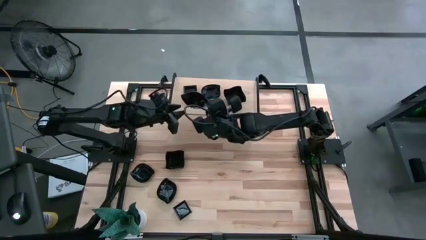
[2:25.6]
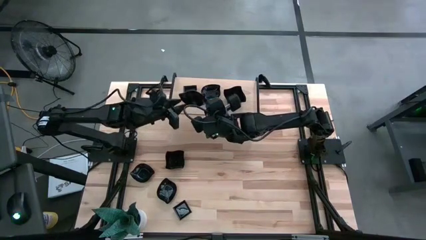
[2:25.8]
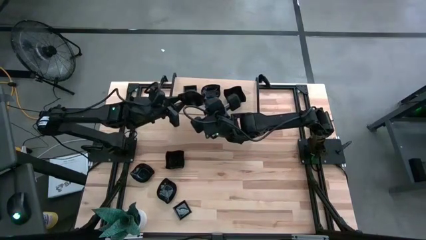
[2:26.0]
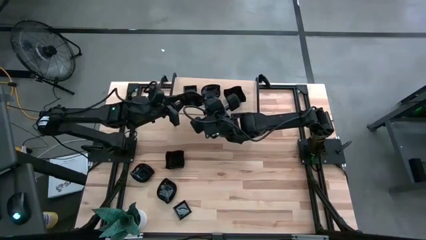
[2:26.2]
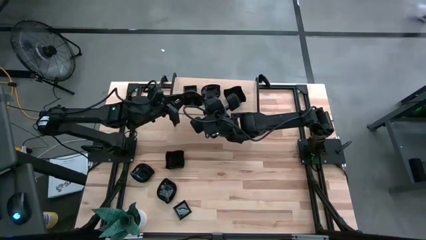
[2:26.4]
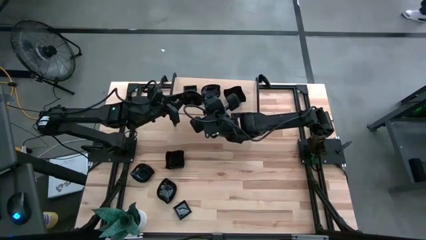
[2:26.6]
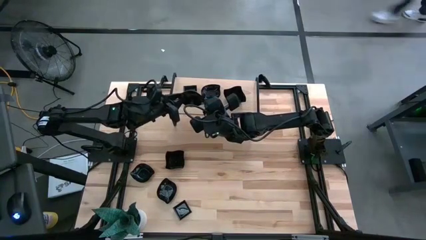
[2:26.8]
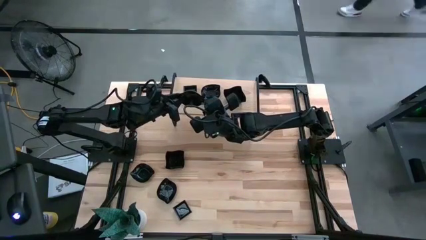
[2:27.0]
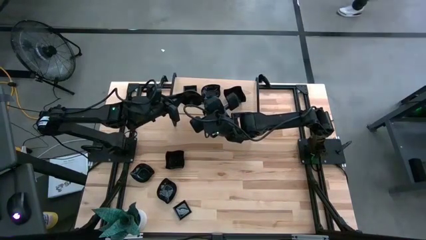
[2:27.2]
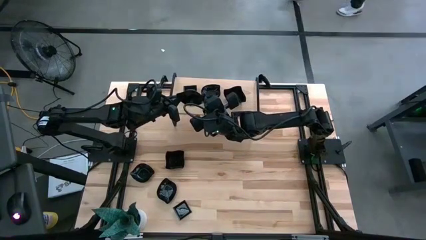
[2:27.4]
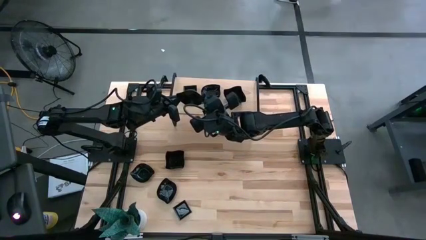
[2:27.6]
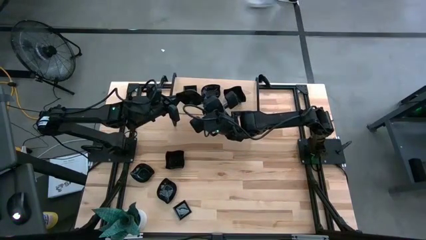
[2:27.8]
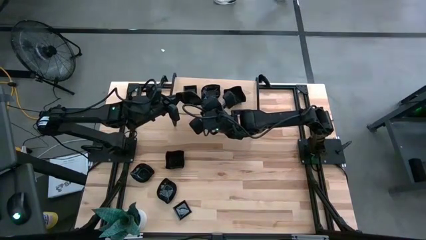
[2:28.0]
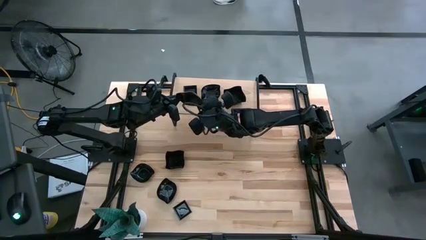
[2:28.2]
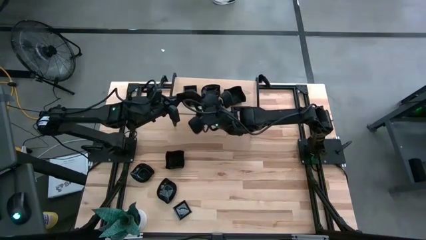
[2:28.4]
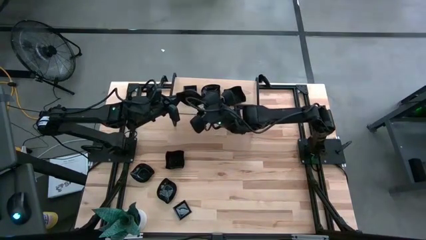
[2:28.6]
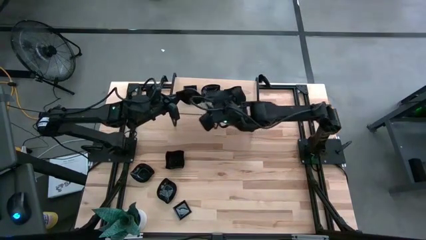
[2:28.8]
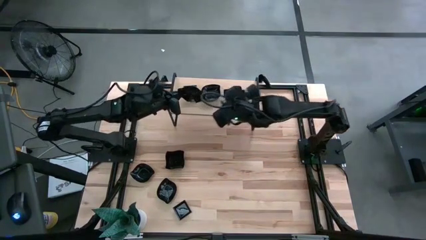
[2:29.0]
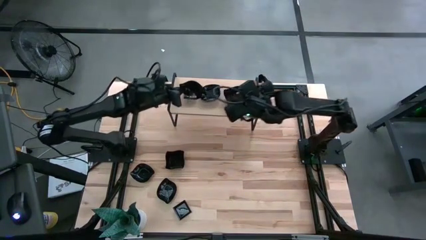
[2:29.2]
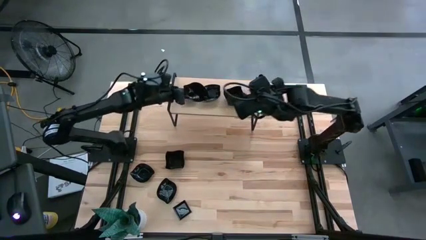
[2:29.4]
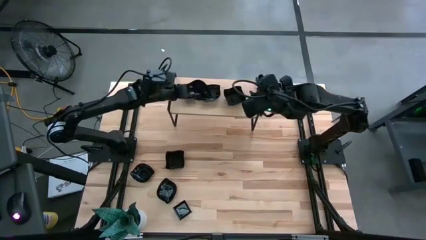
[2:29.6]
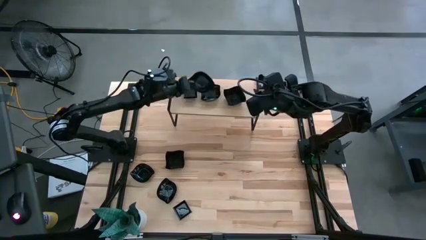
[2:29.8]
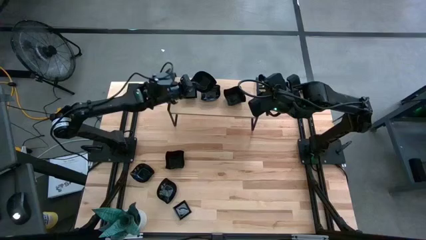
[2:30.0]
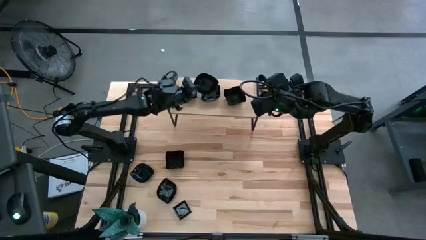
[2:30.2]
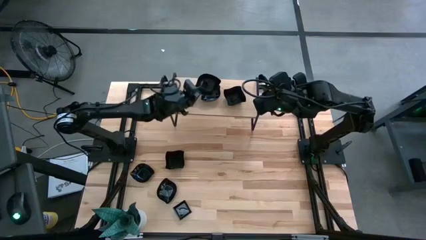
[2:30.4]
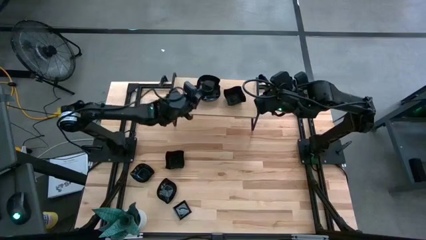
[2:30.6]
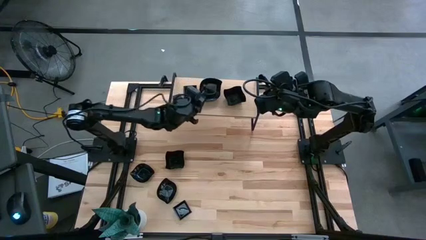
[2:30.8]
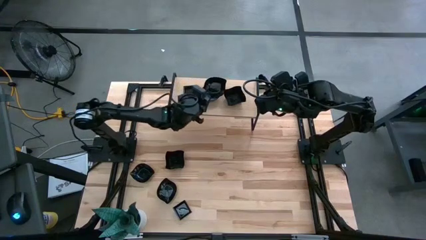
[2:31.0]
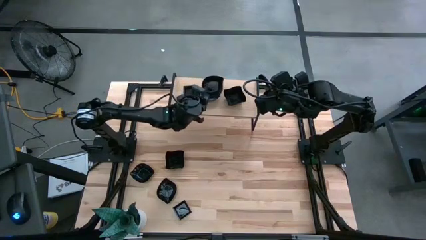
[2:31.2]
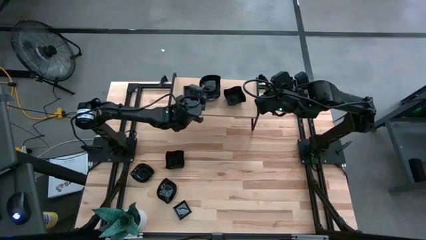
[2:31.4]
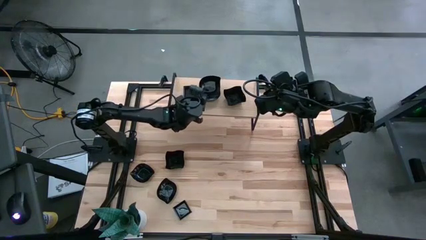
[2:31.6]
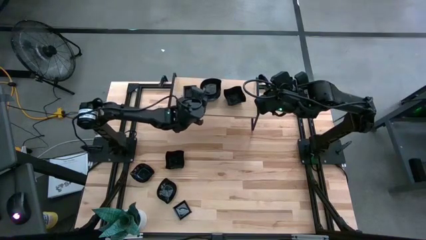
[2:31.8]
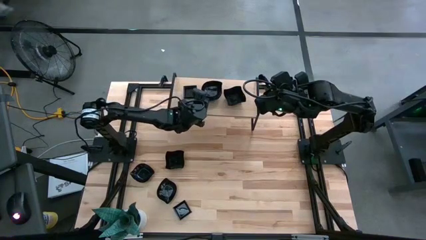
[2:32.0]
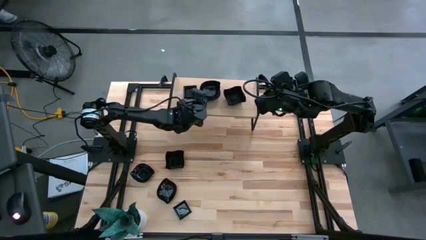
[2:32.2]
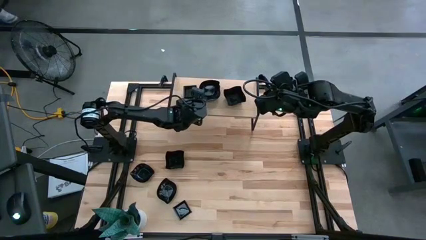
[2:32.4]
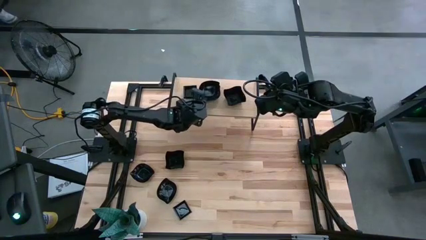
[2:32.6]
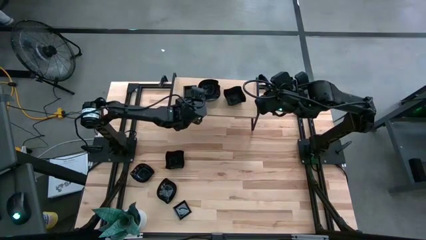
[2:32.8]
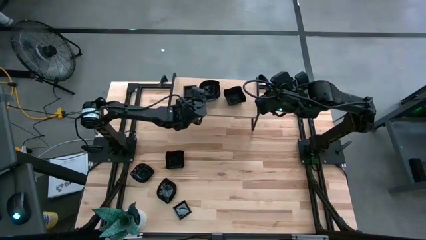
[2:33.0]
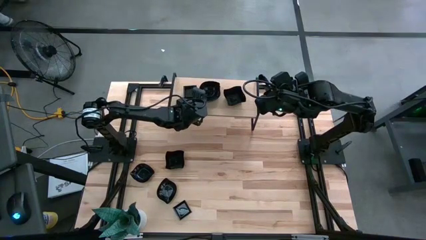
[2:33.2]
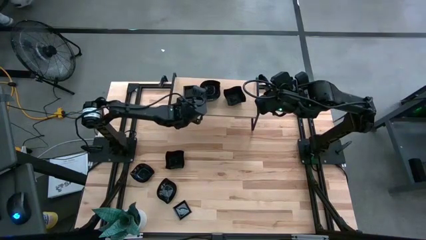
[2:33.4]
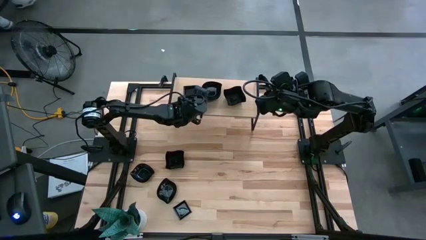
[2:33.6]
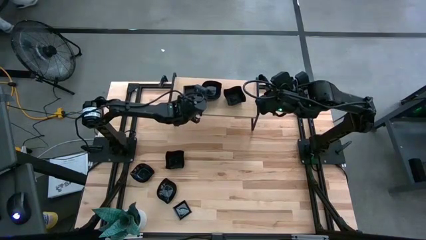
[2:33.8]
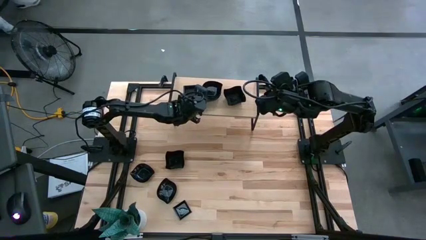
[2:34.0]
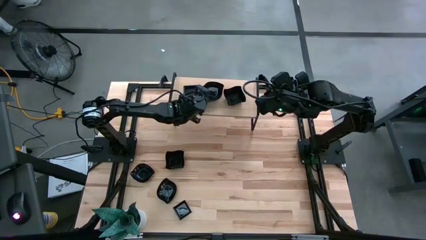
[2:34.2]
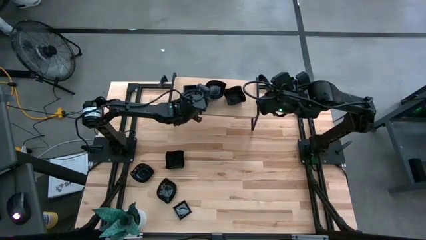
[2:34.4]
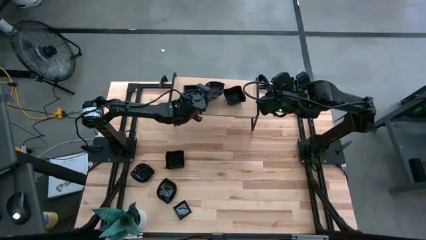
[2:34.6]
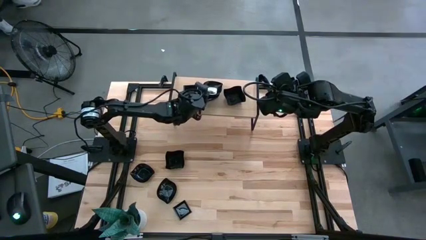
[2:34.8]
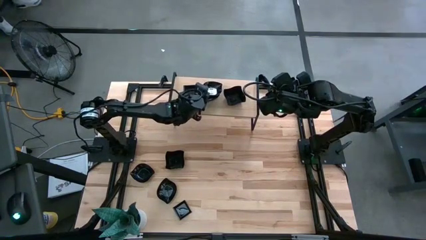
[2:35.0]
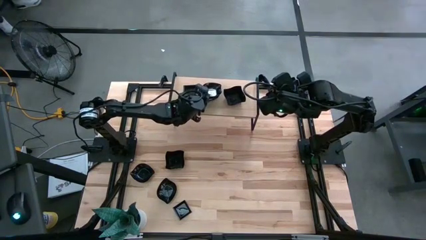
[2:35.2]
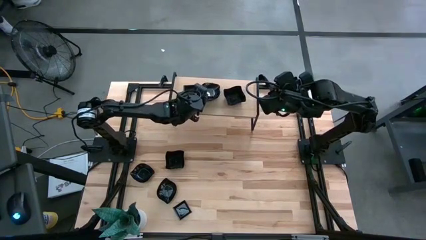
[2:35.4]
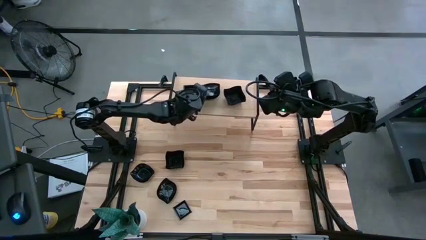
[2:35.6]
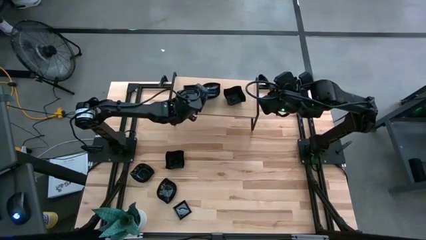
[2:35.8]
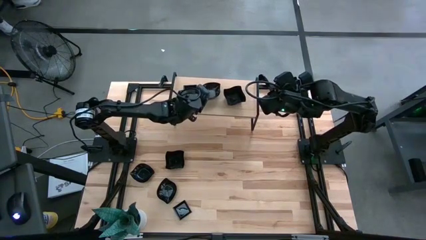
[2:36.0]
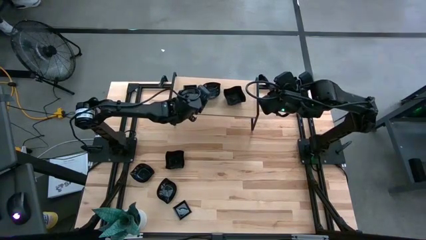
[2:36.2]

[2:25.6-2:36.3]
Task: Pick & Place Mini shaped plates
Stack the leaf-shaped plate on the leaf-shaped plate
